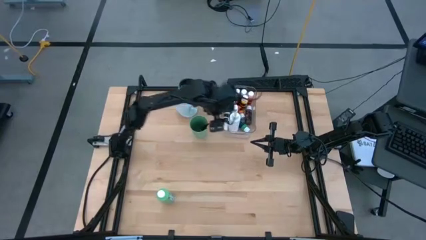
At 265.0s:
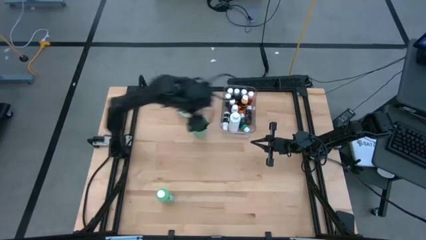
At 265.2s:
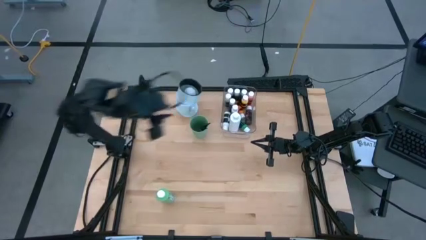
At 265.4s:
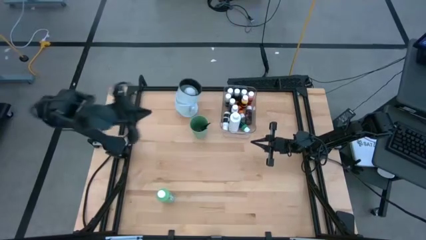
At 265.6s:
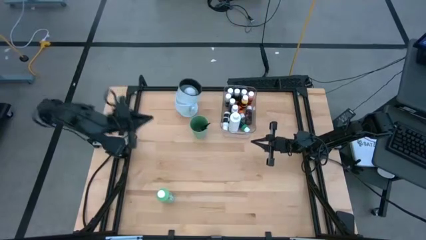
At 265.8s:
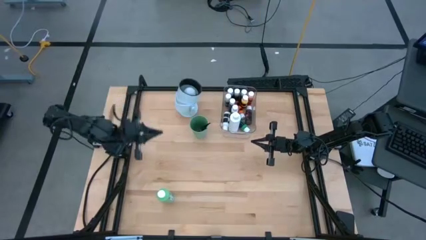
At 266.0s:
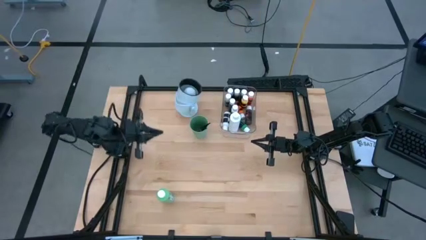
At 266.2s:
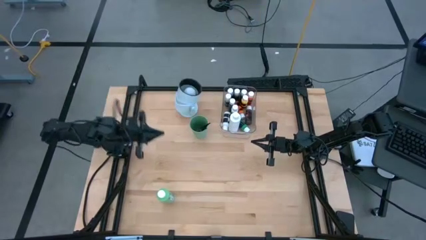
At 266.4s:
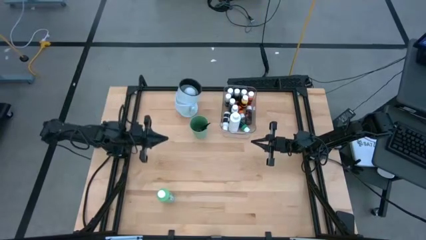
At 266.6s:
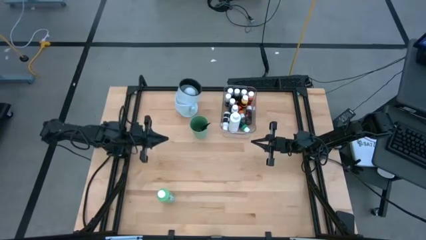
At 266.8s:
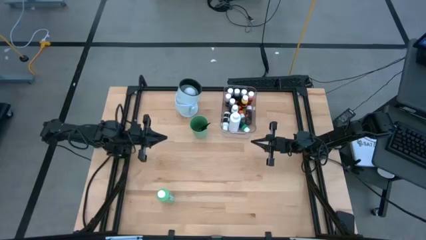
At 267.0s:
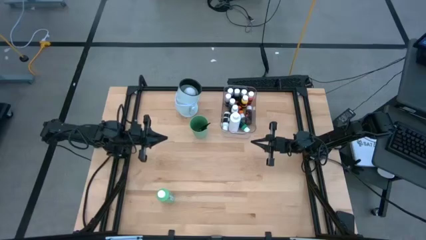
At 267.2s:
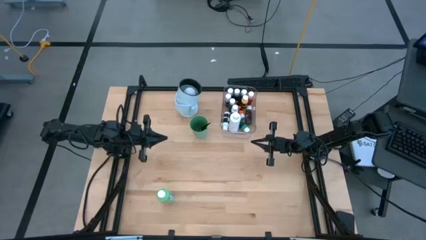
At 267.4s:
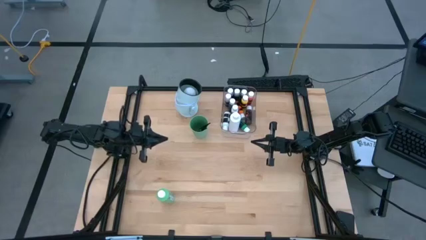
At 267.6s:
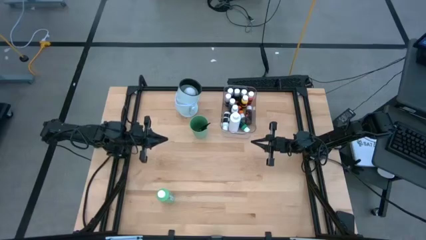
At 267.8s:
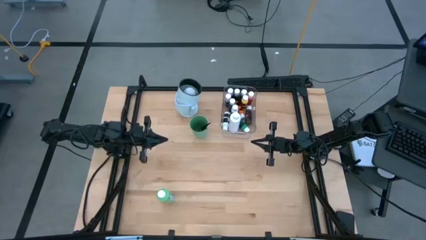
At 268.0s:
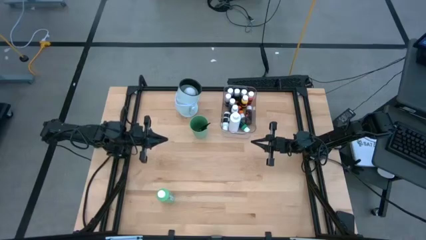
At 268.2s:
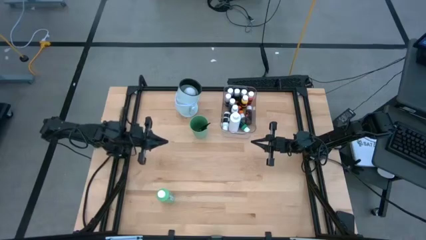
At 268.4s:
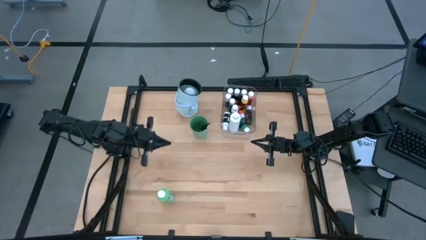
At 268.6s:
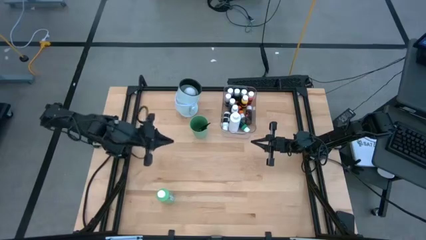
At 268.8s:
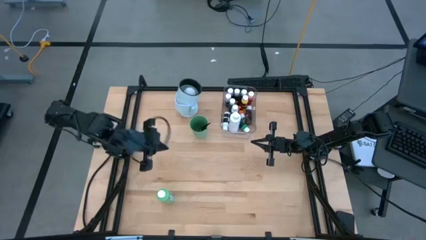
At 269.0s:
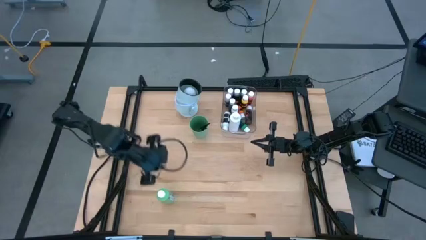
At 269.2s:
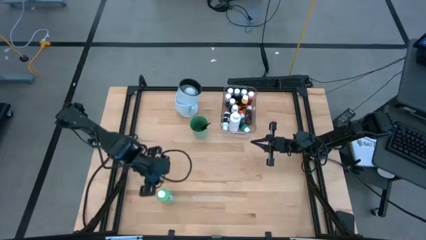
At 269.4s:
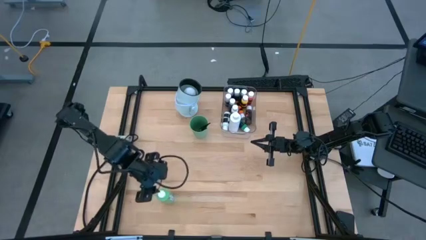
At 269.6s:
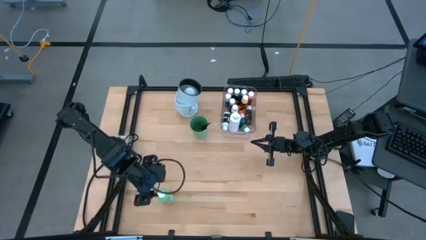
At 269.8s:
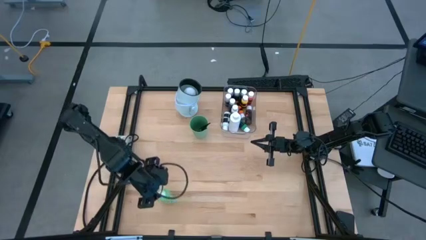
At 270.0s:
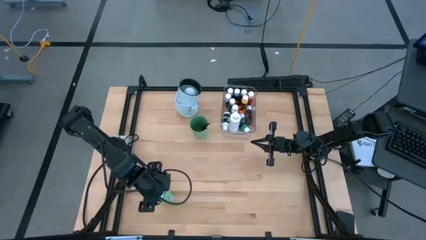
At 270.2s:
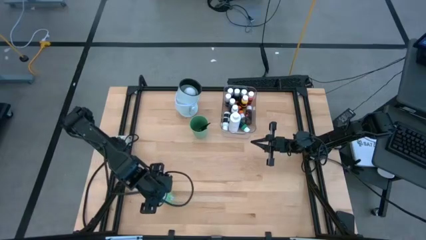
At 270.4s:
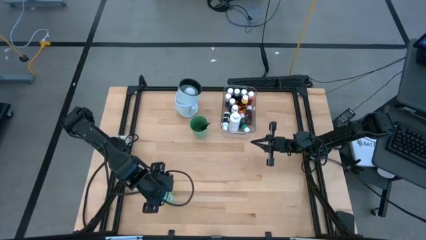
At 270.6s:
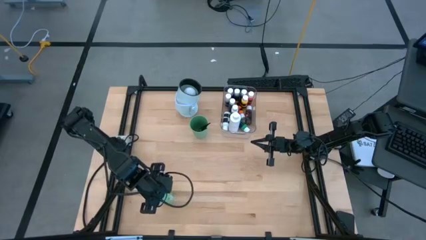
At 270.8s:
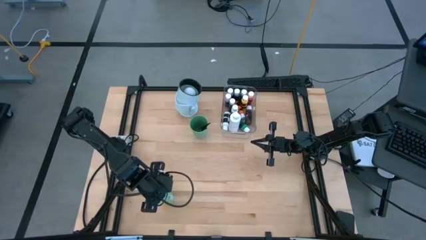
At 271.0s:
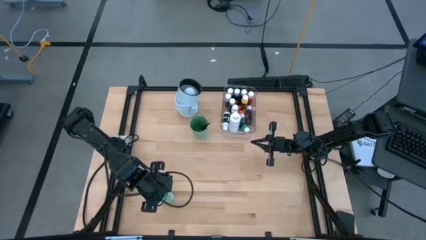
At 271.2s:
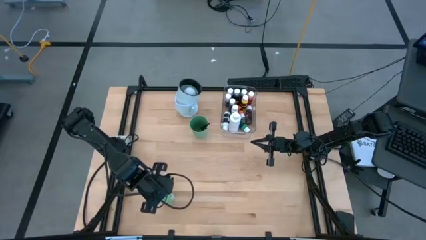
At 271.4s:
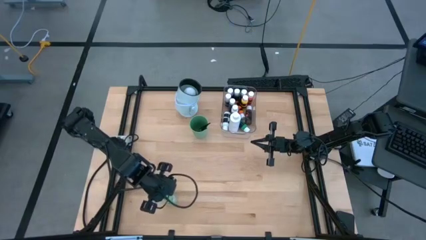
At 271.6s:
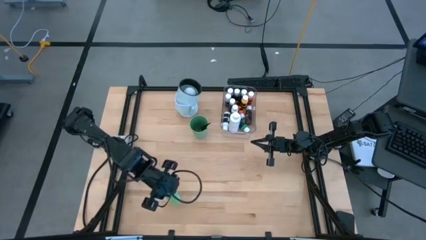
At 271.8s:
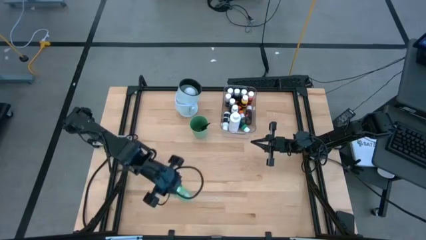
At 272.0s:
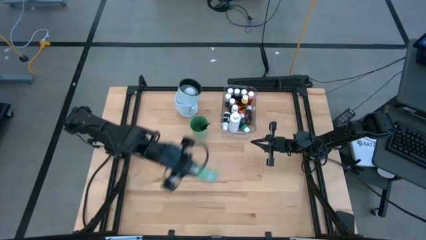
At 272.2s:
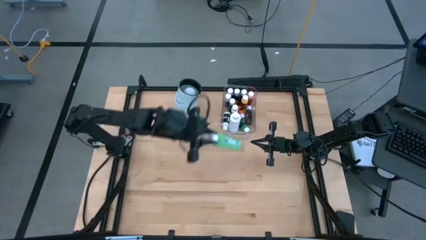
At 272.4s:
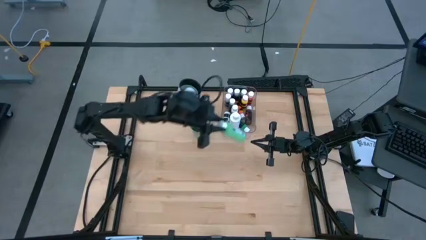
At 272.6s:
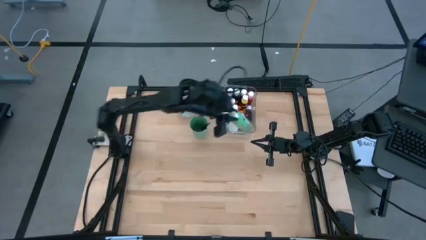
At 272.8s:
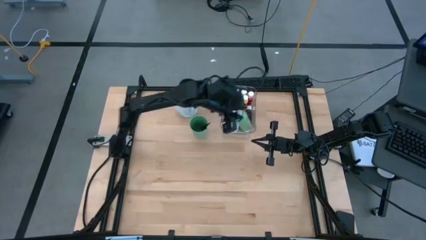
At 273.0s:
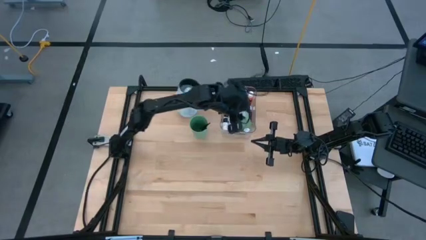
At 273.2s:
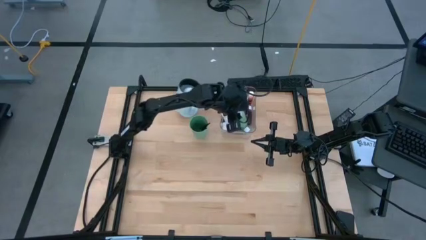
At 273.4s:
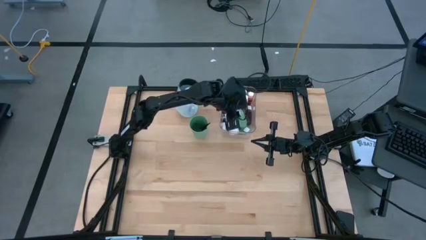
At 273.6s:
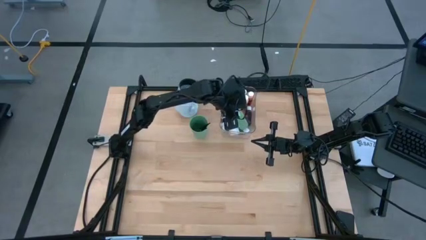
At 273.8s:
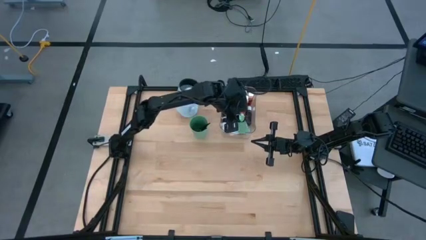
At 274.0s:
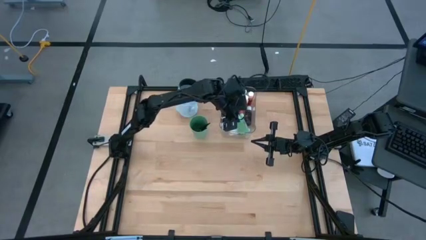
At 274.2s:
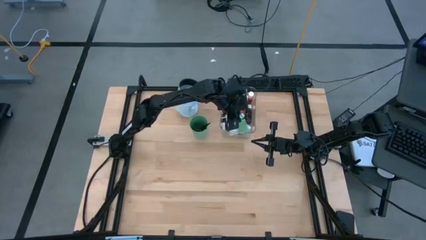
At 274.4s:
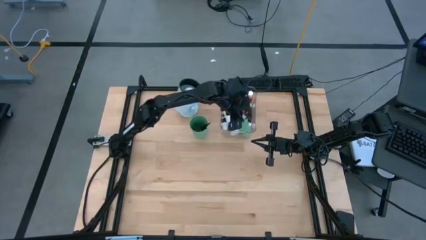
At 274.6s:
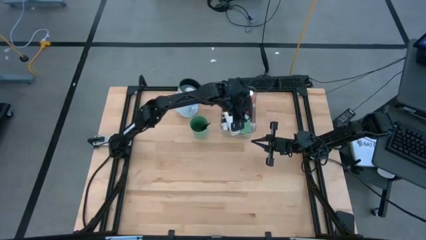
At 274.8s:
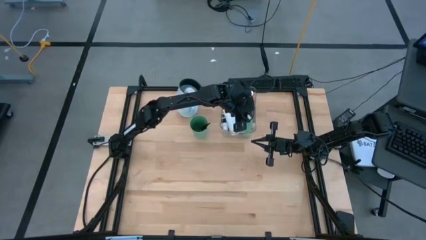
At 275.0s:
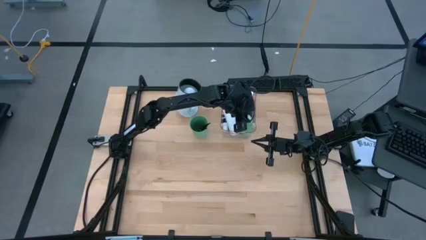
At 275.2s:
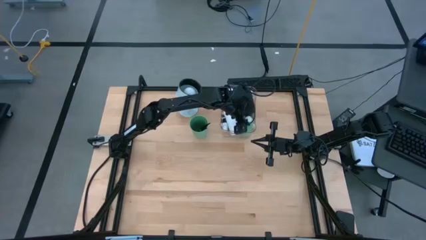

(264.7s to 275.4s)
Task: Pick & Place Paint Supplies
Put the large green paint bottle into the transparent bin
